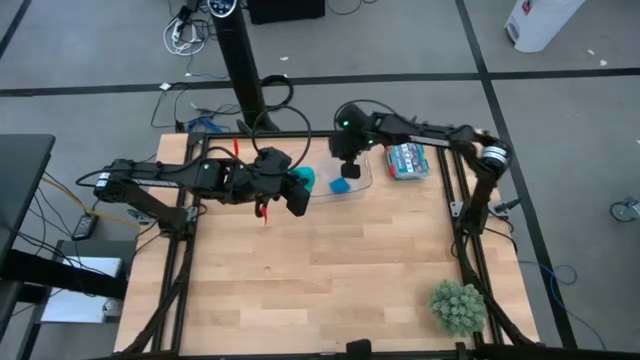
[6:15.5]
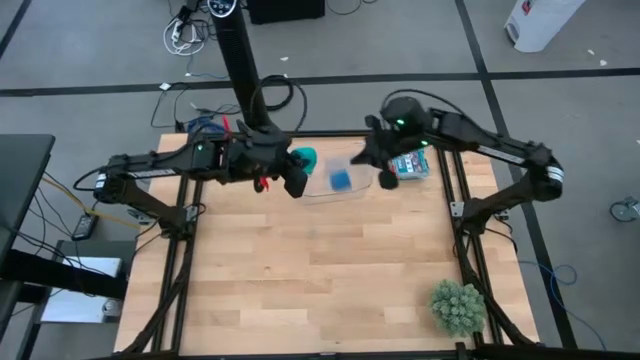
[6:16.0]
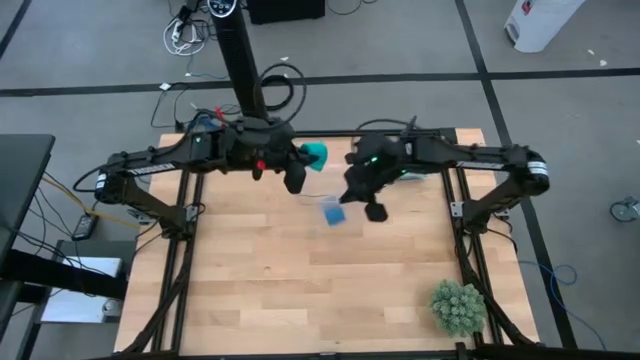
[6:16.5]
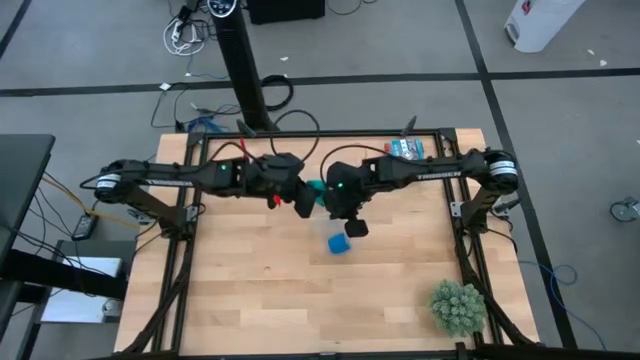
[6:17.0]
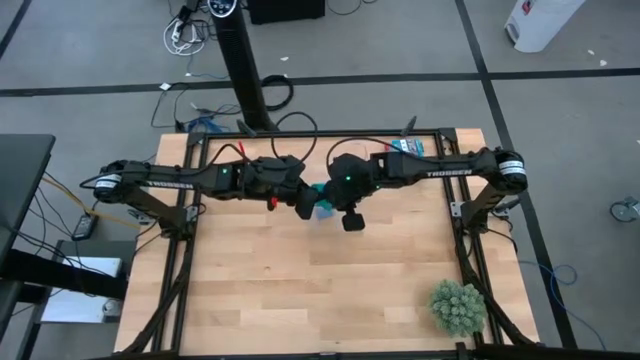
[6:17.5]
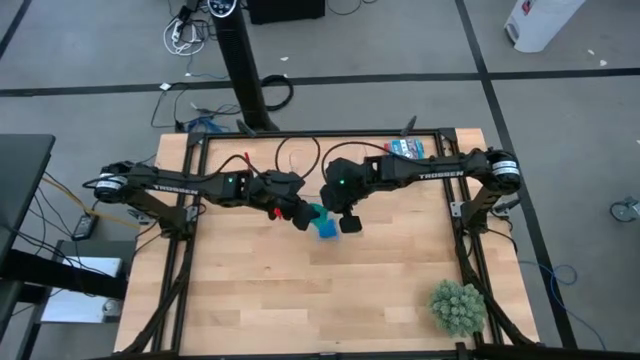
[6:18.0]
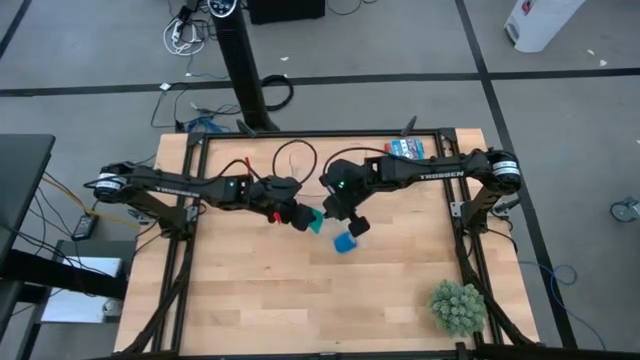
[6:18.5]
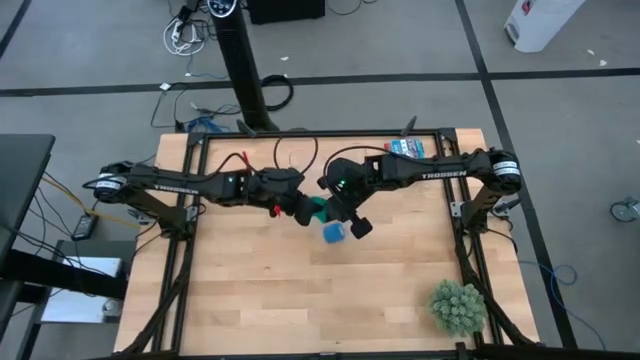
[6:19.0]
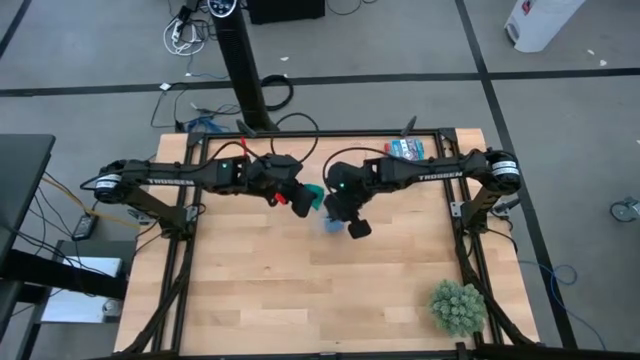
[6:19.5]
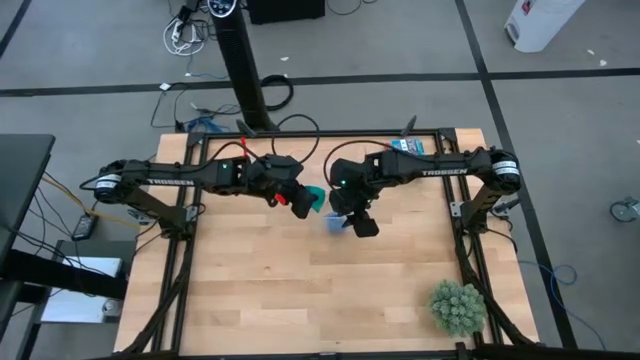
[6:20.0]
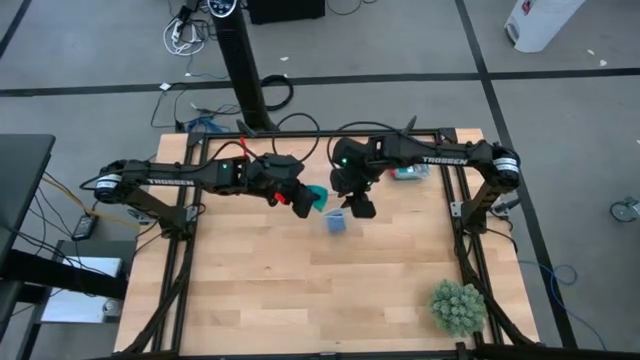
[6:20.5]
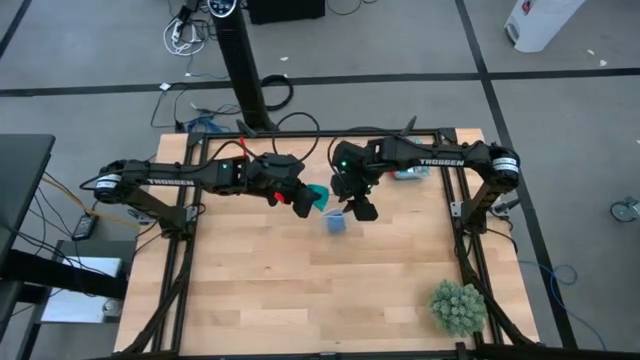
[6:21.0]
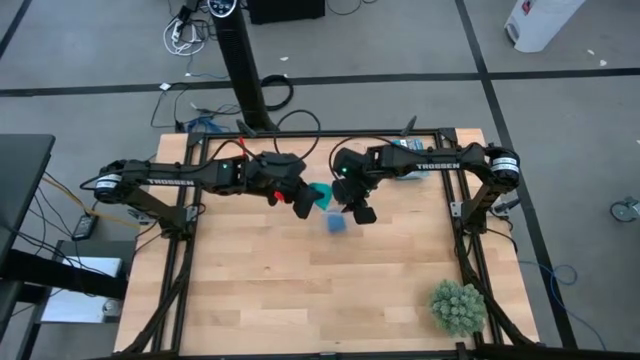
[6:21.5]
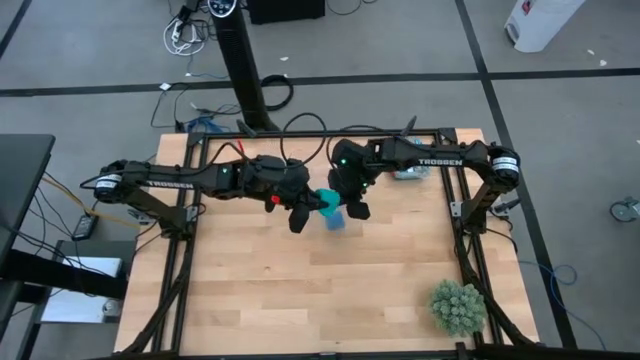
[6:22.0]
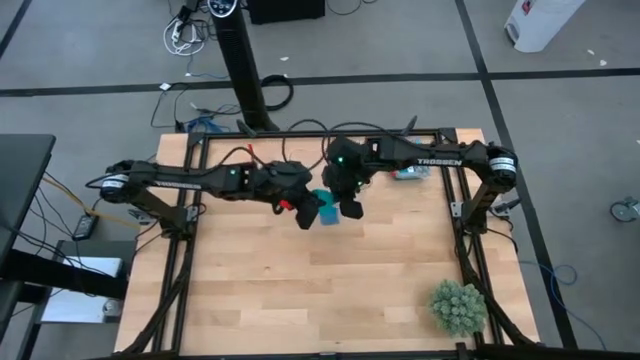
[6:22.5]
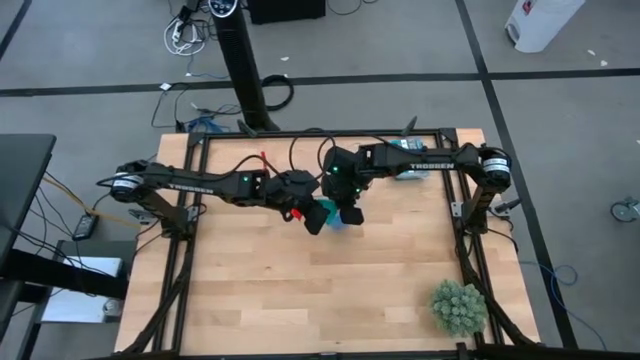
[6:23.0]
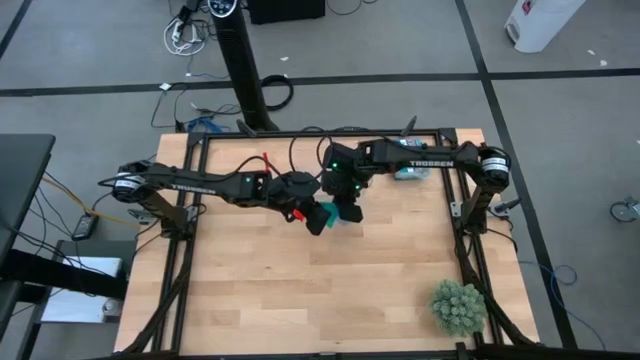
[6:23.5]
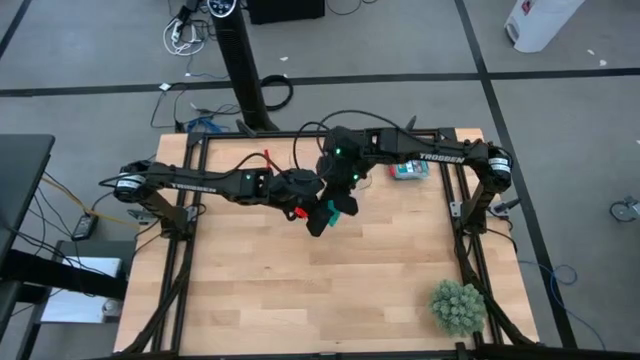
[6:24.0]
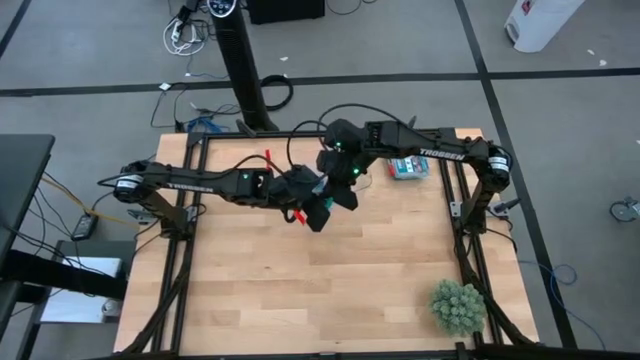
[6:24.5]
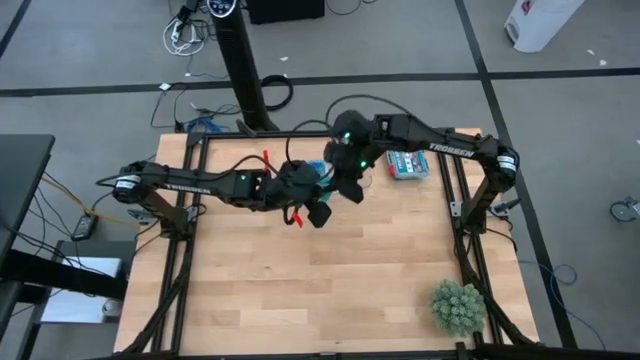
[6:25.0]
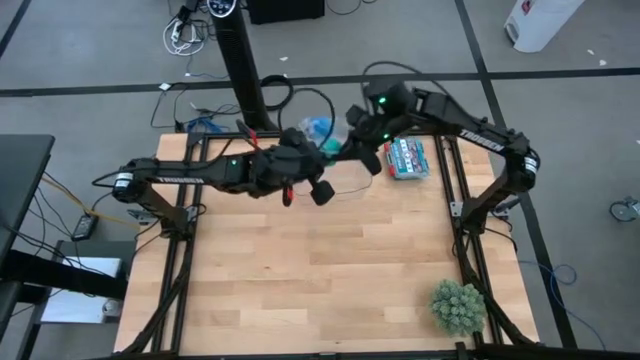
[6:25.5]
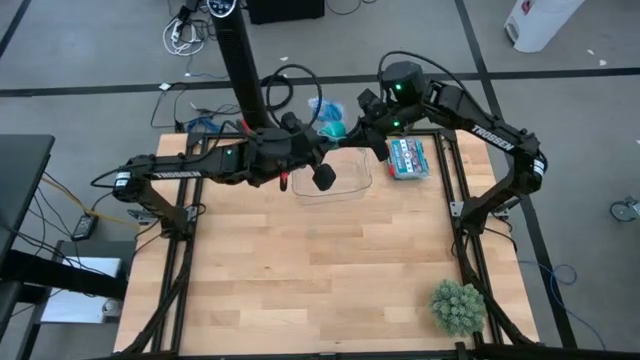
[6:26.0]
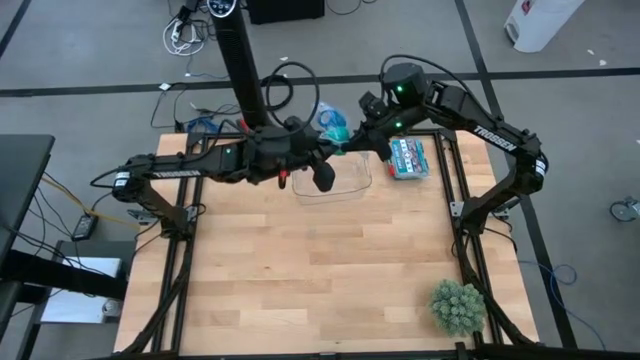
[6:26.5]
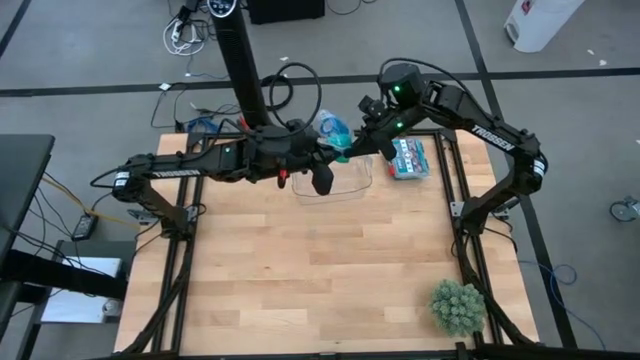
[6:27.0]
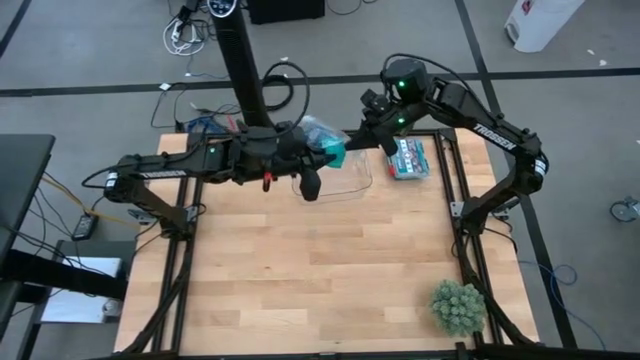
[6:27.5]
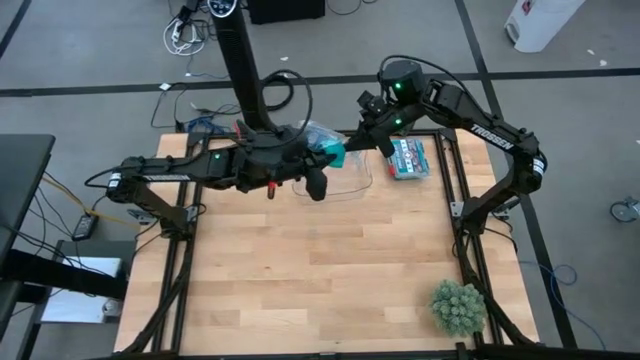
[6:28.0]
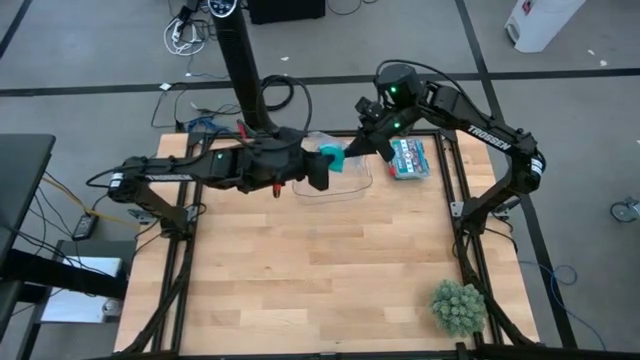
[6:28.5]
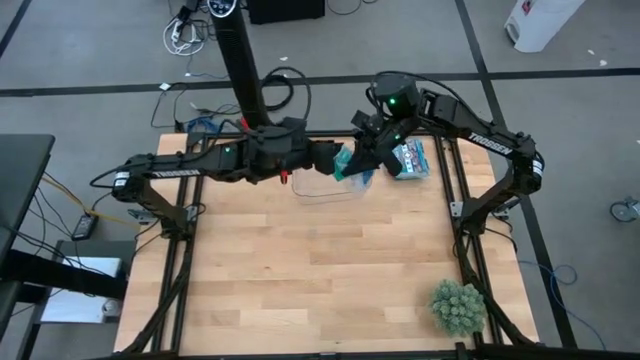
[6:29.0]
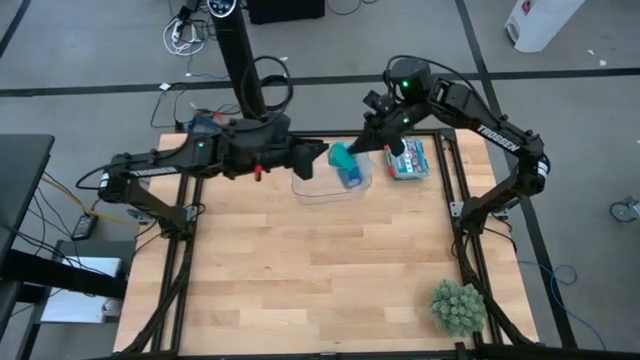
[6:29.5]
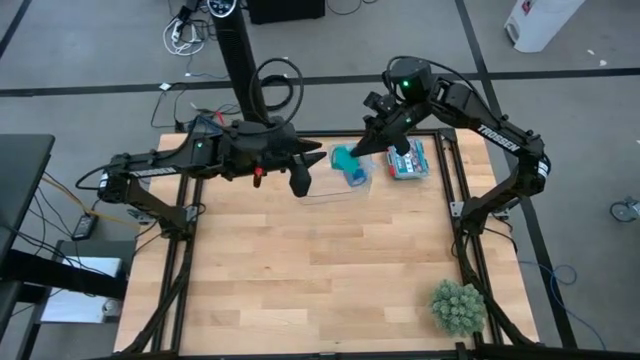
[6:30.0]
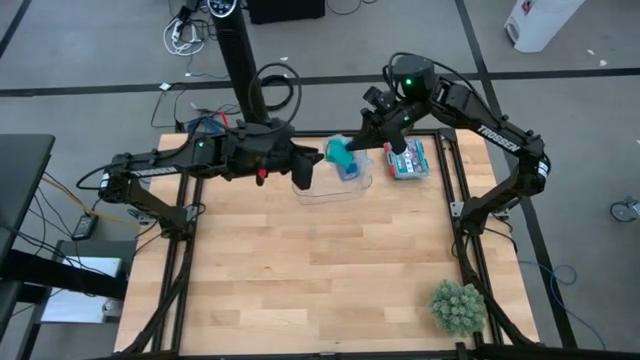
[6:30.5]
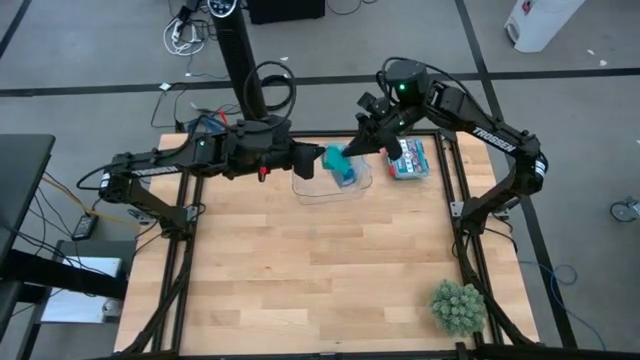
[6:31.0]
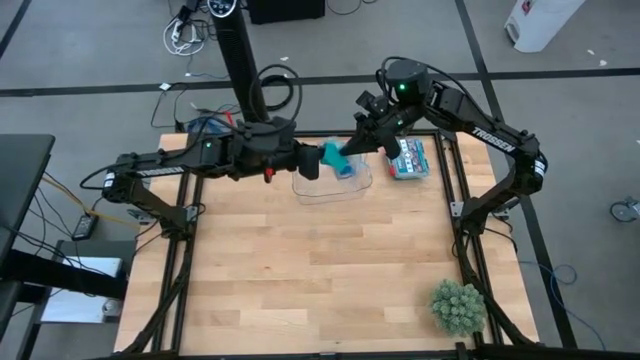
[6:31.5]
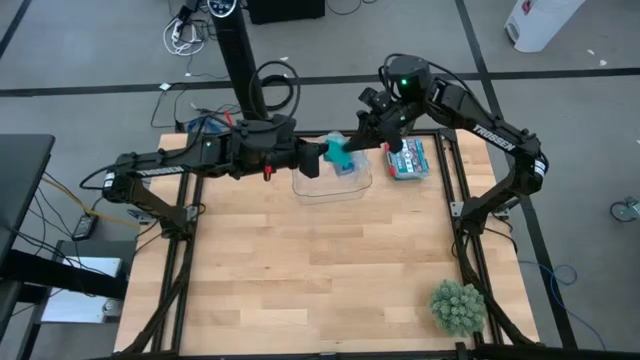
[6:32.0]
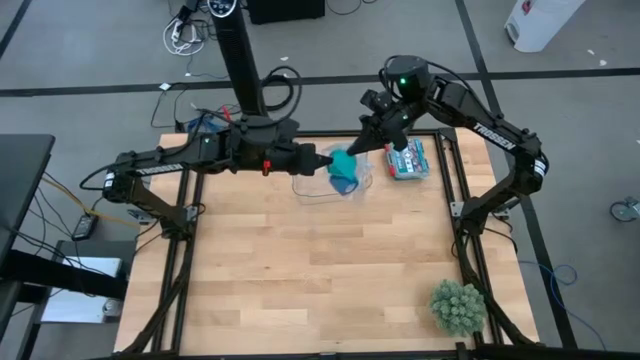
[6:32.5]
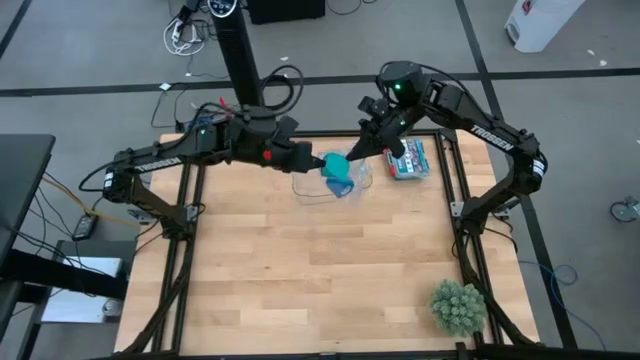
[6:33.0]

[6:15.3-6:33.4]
Task: Roll bandage
Put the sky blue bandage into the transparent zip bag

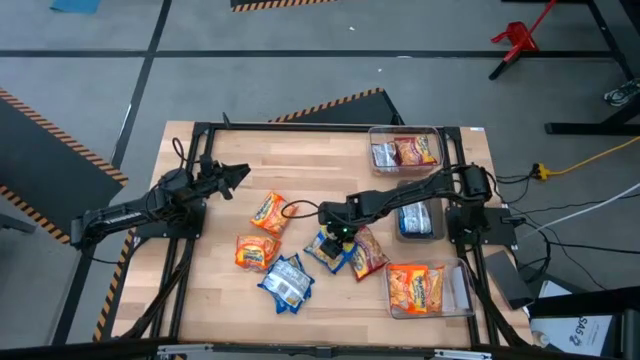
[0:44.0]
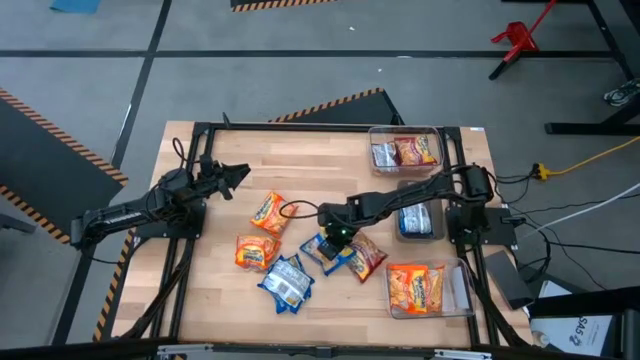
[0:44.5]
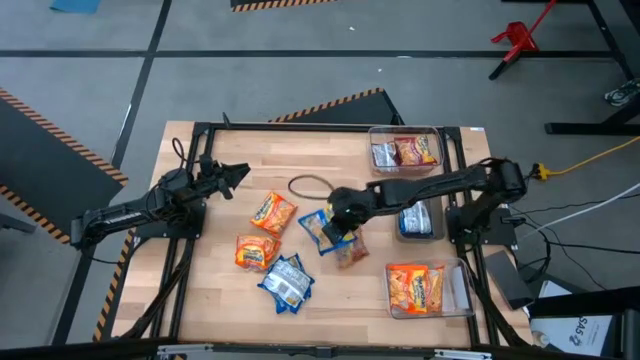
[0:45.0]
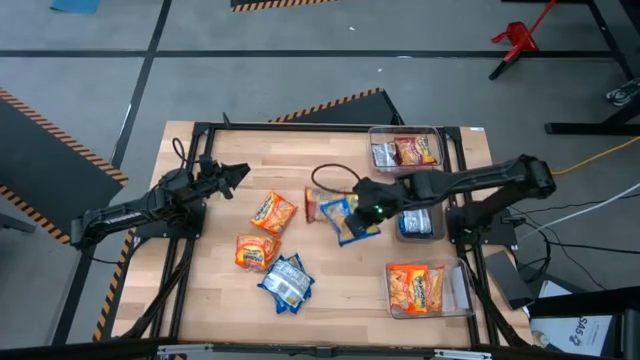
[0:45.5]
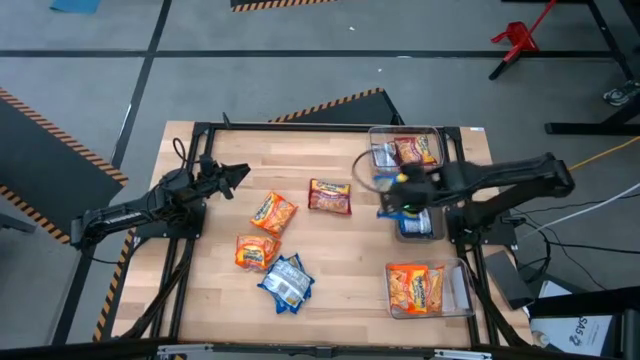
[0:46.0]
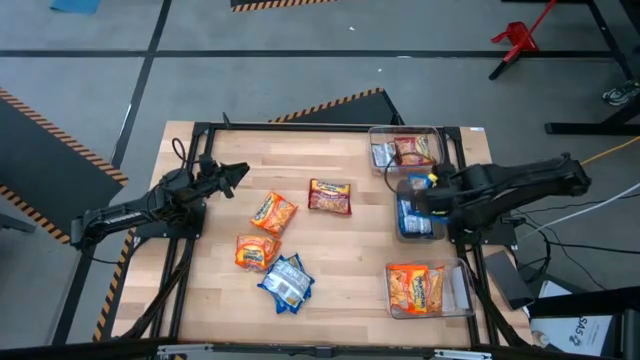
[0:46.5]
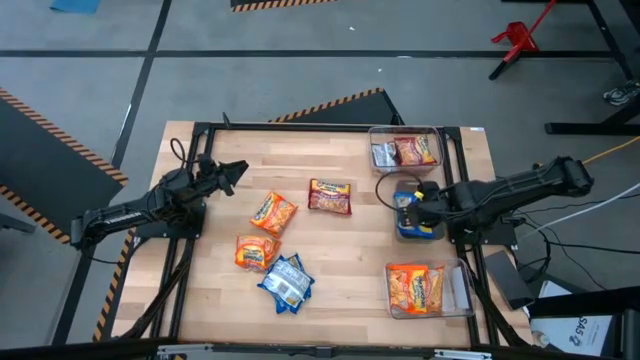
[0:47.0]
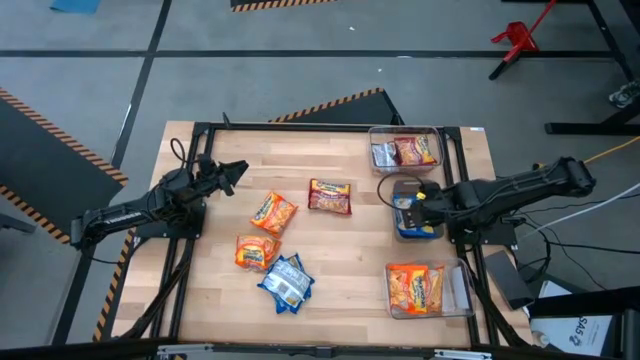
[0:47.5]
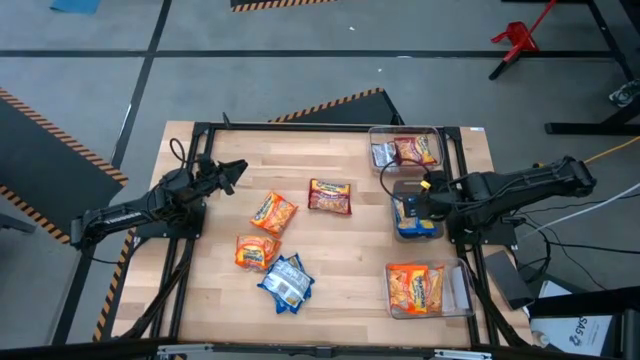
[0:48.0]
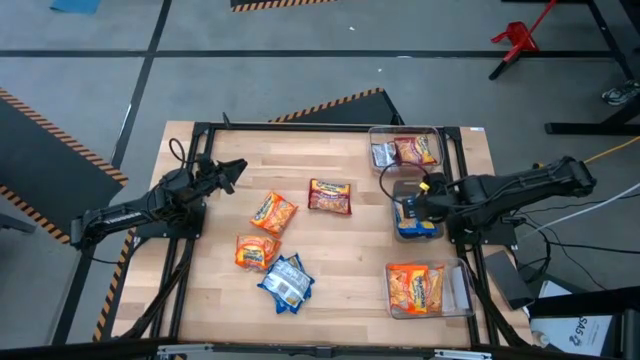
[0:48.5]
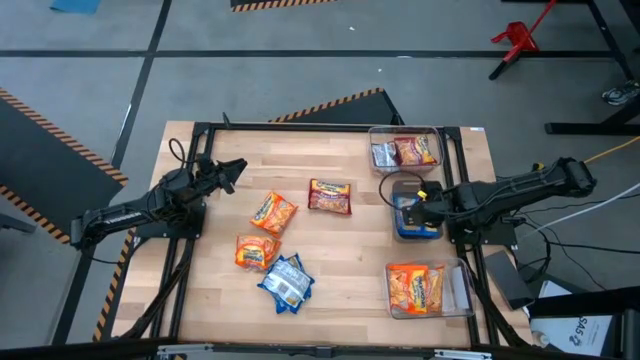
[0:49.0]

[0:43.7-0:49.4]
Task: Sort Maruchan noodles
Put the blue noodle pack into the black bin
